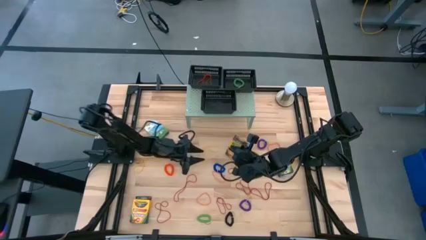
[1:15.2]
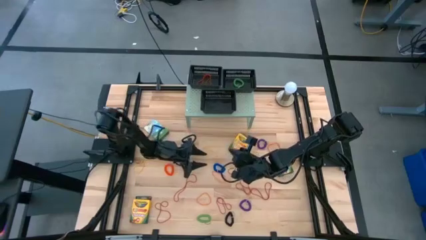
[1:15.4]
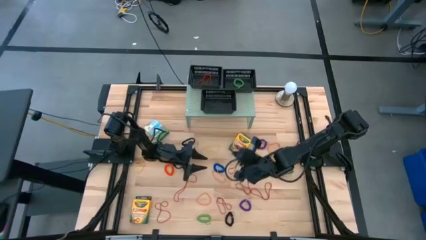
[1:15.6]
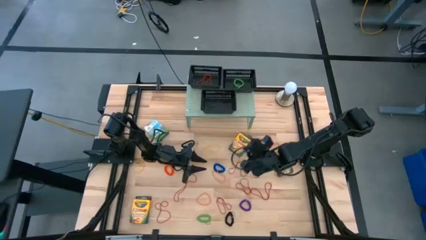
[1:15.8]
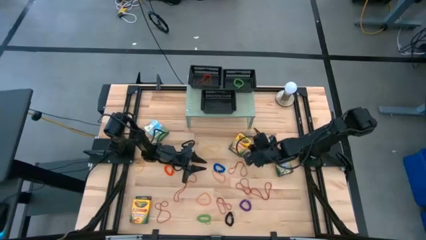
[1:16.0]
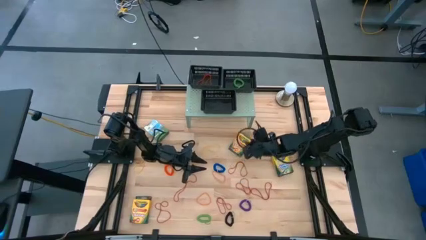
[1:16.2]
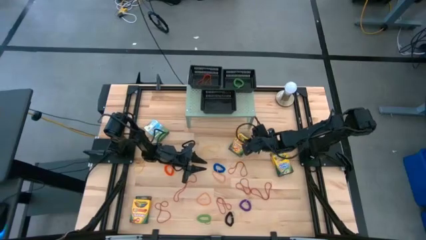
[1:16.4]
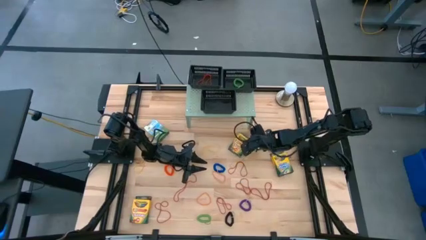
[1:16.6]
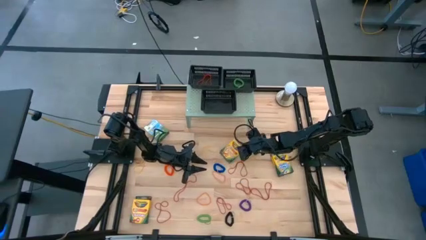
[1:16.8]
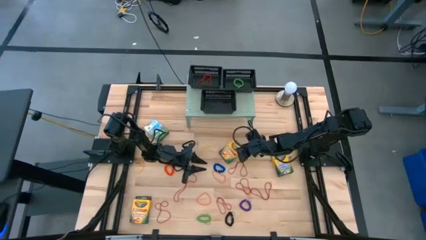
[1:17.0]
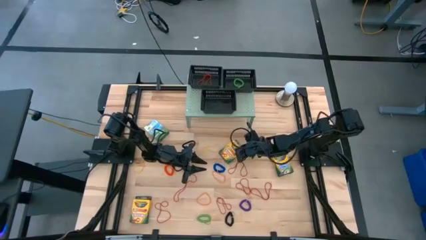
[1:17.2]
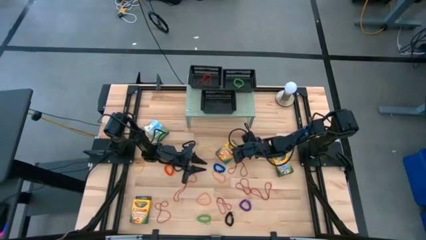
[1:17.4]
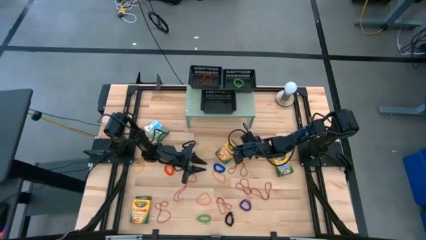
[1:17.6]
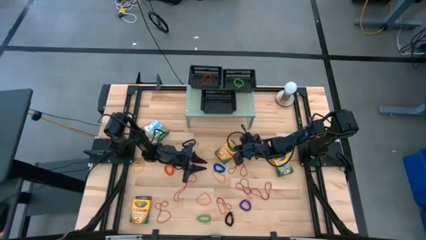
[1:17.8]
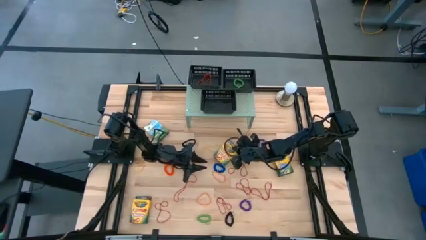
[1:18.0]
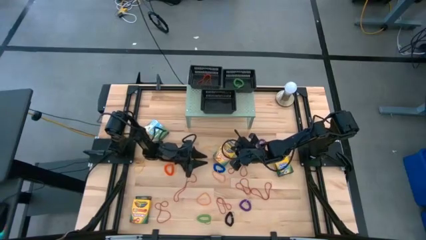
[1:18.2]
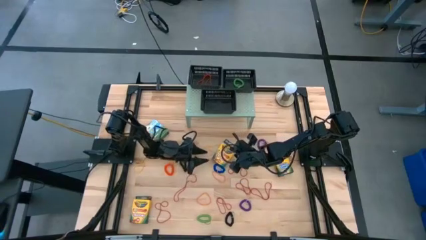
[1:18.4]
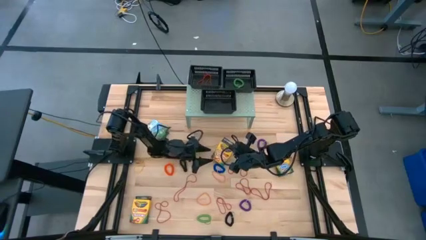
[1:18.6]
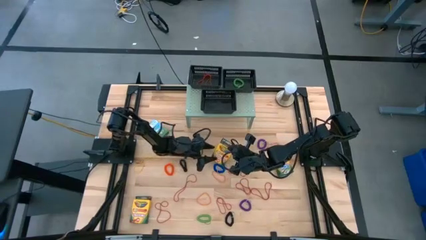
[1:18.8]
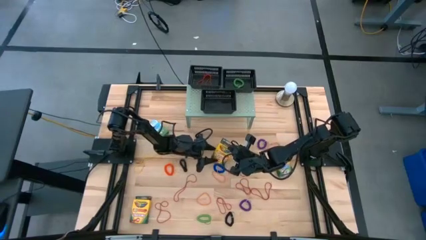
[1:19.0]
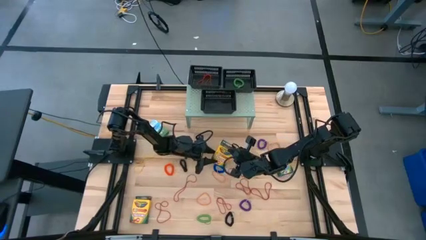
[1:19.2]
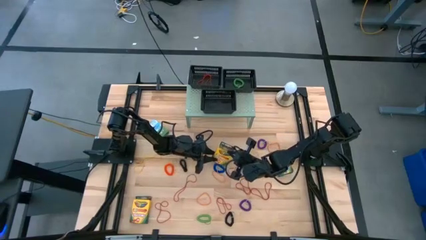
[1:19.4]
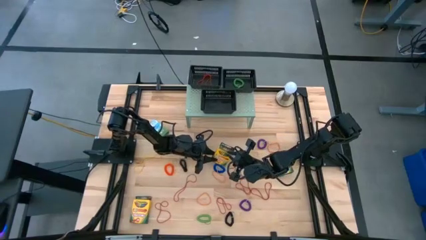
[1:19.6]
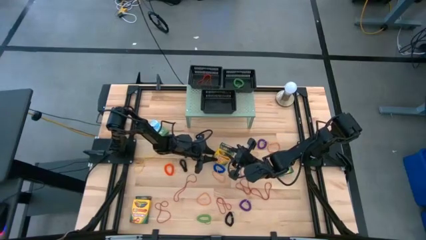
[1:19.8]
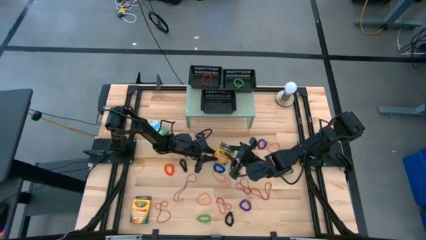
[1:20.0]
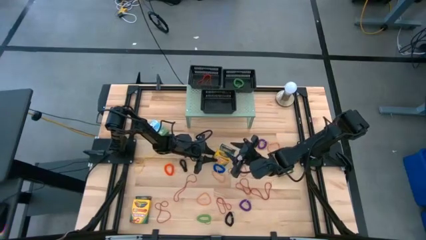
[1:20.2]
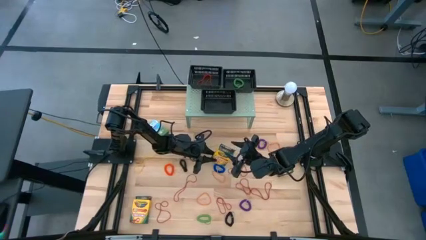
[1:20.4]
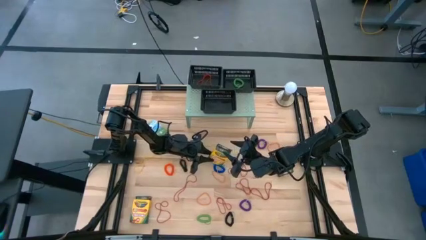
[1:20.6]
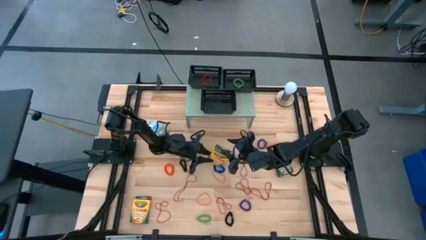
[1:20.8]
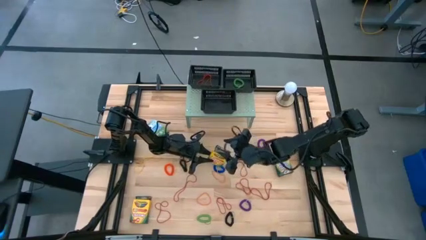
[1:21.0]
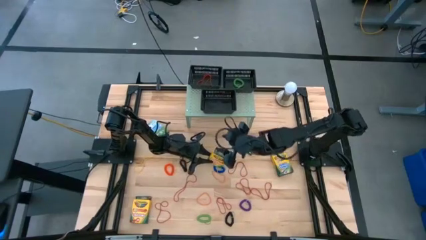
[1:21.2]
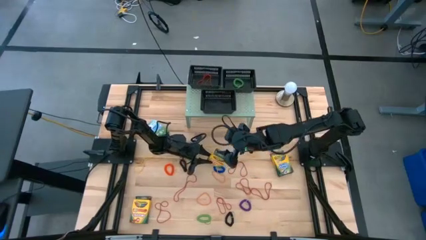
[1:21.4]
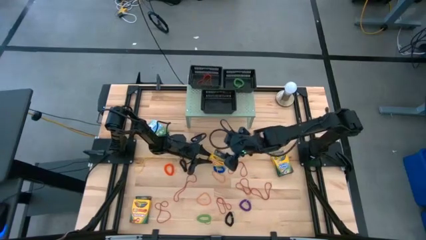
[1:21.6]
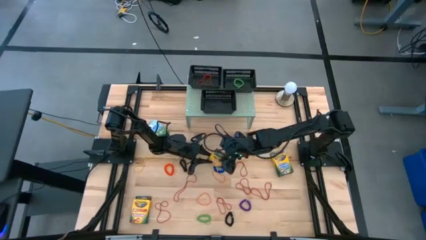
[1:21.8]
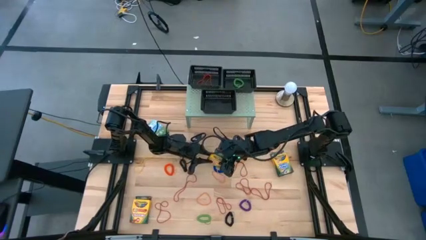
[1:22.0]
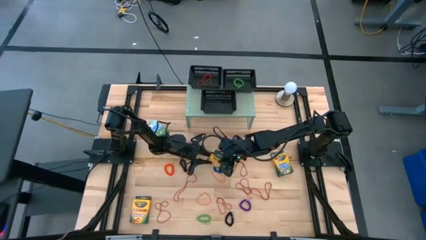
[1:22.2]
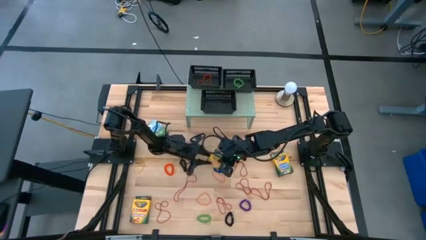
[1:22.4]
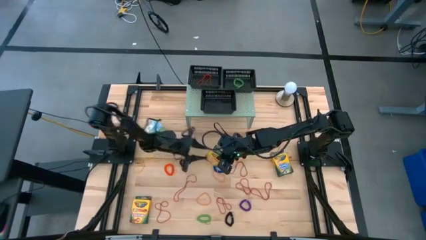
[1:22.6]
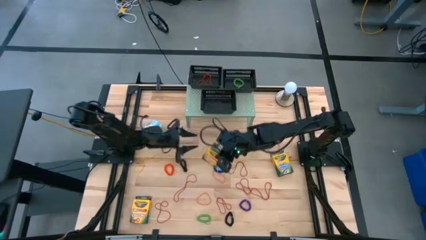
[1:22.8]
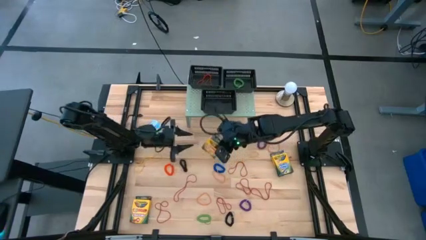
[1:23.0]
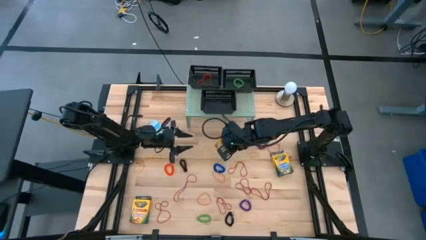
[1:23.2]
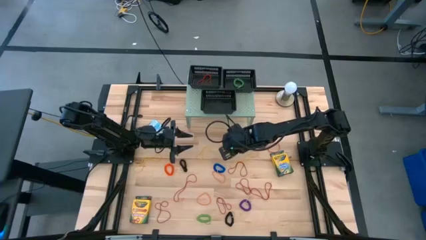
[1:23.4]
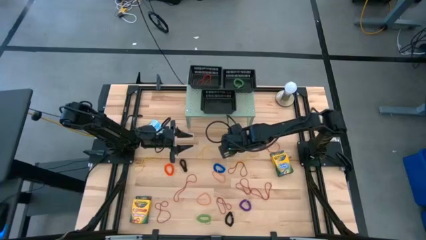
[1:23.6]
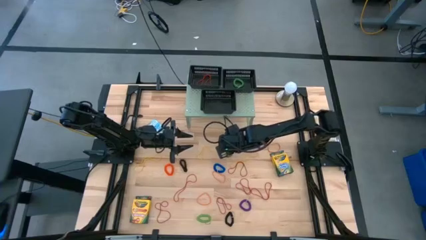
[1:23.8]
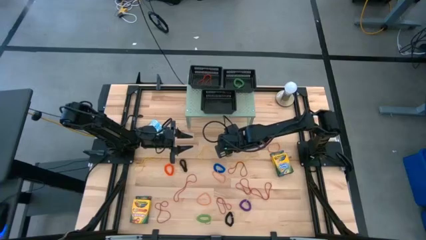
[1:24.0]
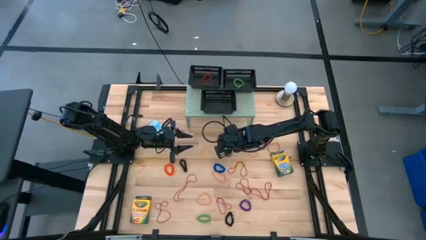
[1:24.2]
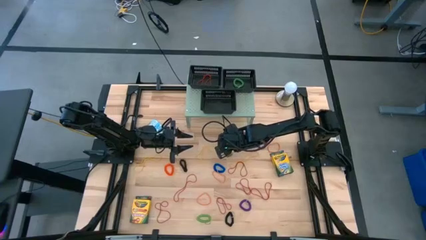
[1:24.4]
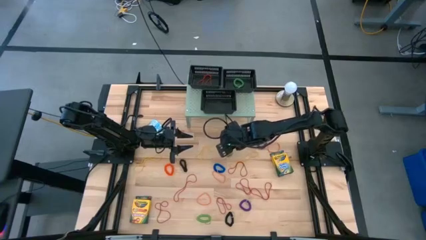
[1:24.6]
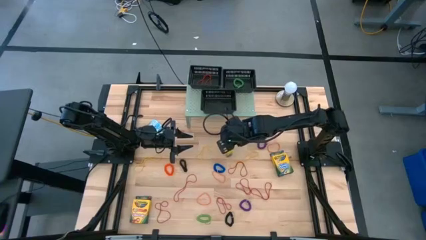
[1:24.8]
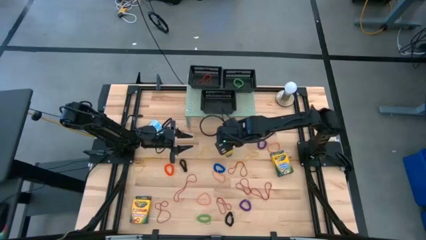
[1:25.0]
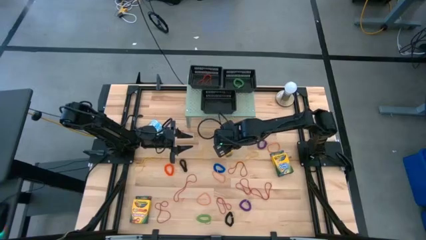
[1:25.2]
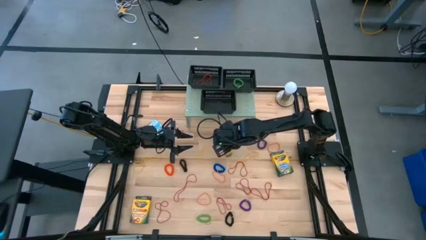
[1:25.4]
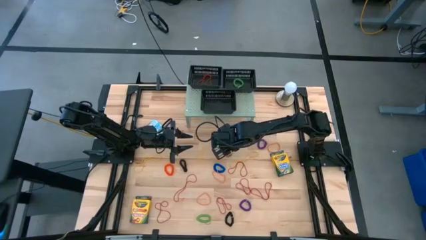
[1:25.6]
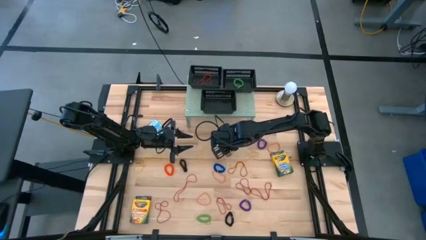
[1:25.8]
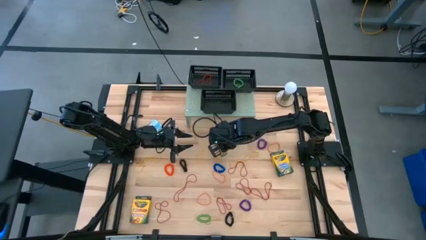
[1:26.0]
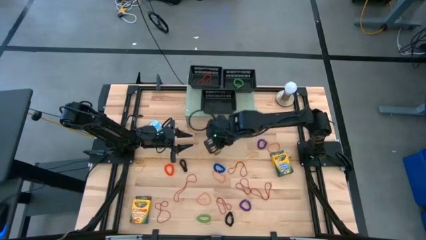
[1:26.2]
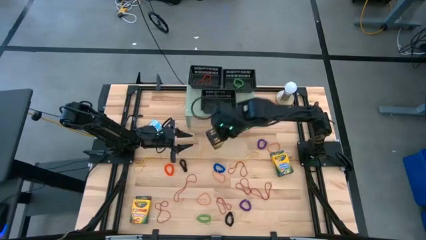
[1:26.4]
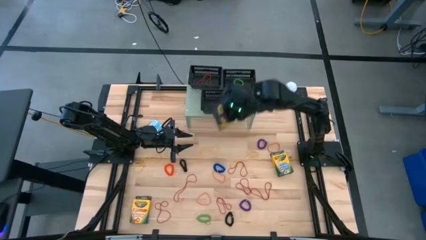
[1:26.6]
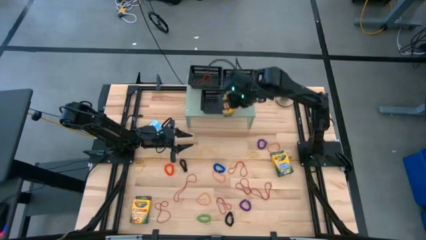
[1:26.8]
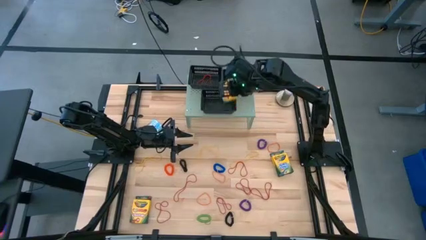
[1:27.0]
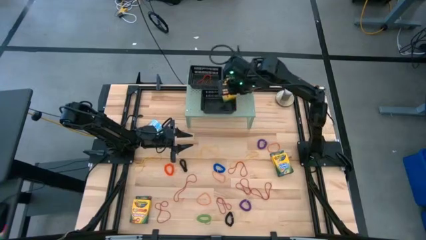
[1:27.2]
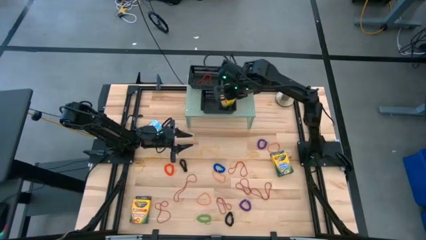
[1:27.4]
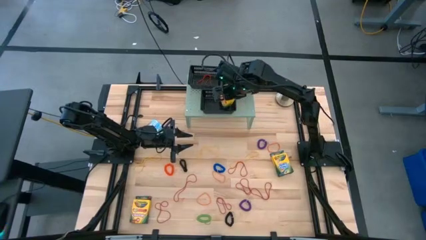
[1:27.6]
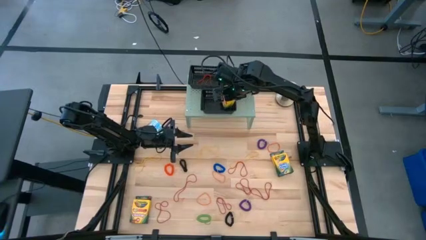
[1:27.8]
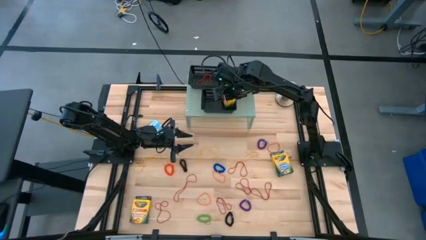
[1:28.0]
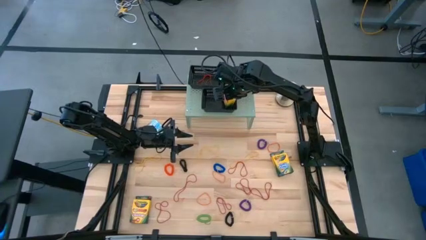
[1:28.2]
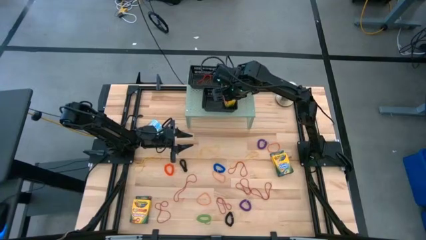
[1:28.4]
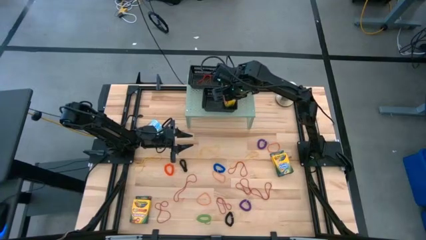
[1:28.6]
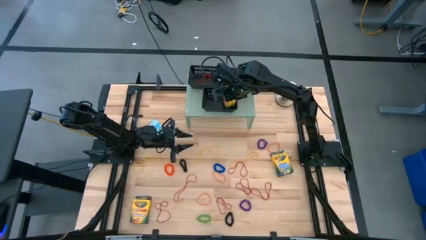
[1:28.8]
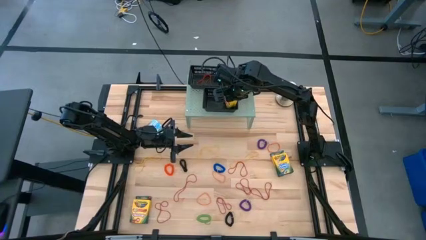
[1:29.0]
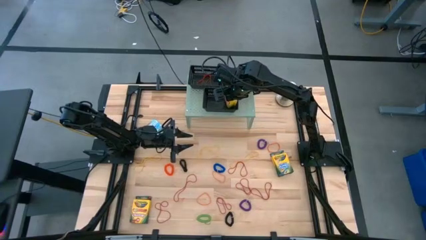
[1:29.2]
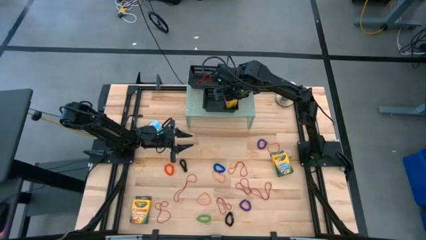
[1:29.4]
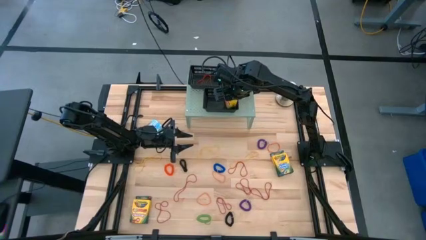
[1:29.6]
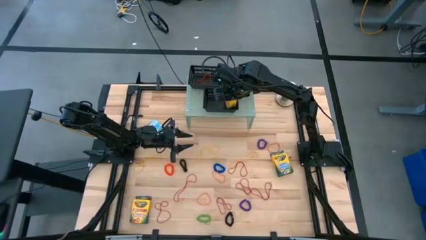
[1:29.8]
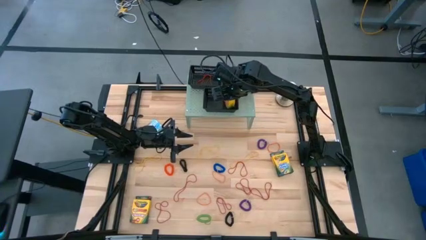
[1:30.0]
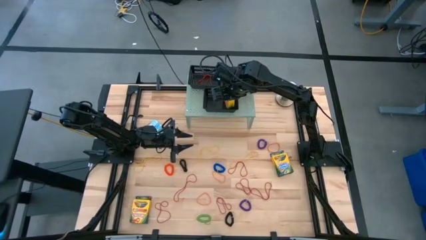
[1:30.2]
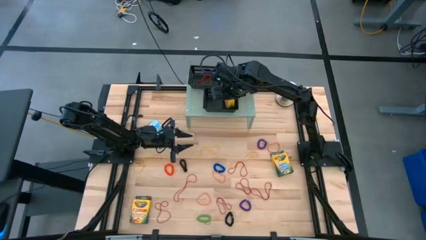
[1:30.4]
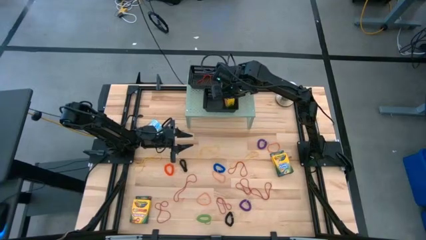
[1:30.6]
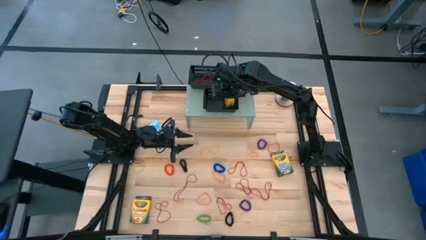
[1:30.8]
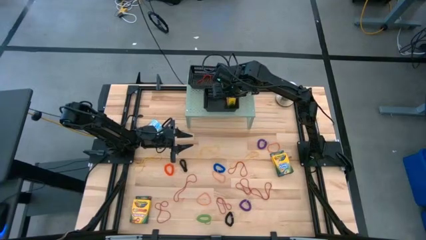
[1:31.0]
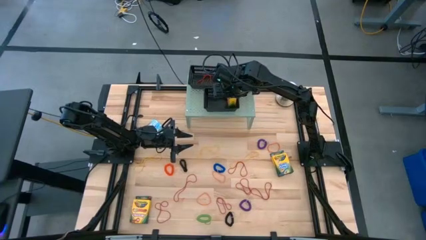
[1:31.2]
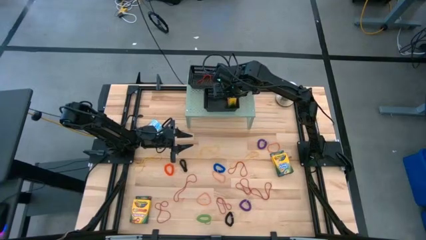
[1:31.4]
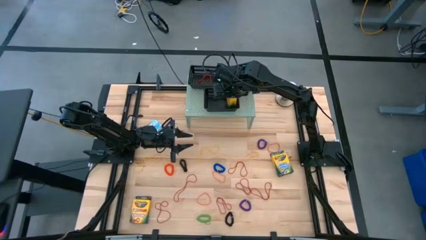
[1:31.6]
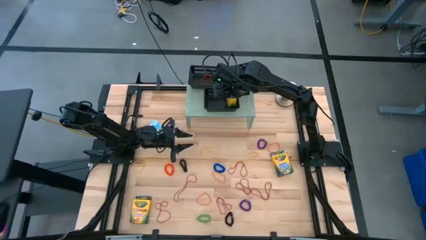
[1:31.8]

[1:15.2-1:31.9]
Task: Pick & Place Office Desk Supplies
Put the yellow crayon box into the bottom black bin
